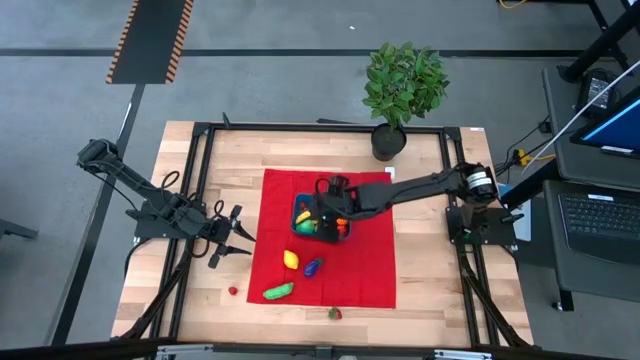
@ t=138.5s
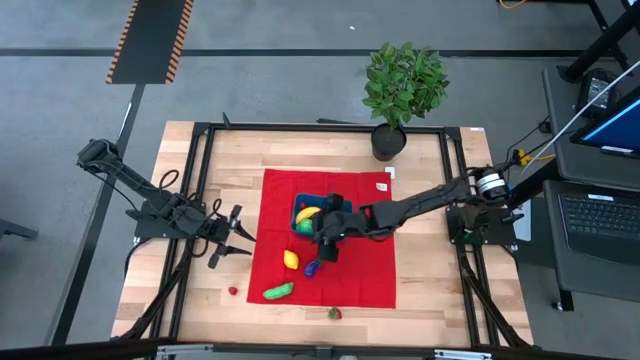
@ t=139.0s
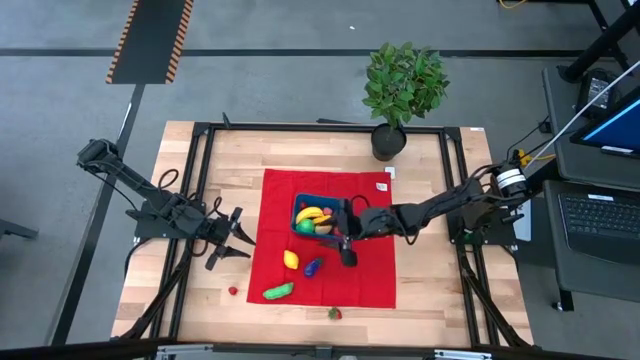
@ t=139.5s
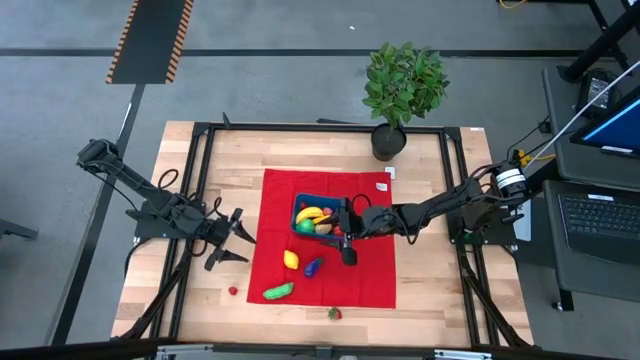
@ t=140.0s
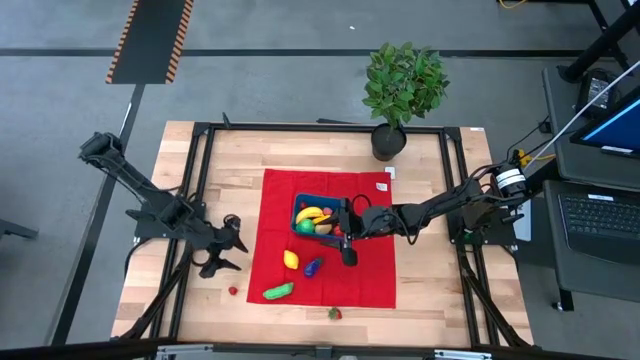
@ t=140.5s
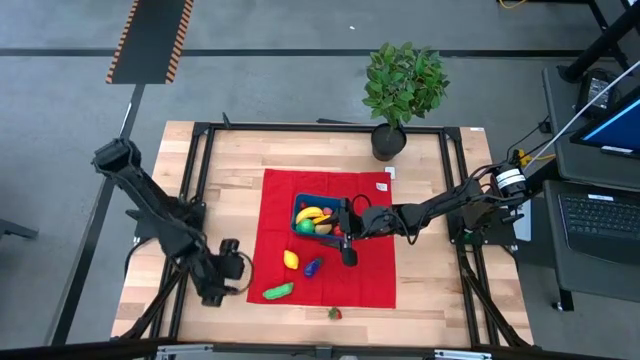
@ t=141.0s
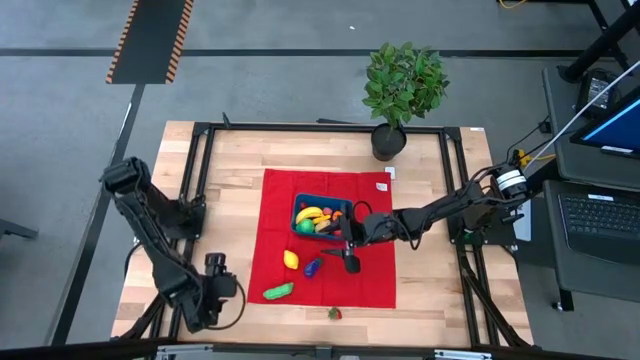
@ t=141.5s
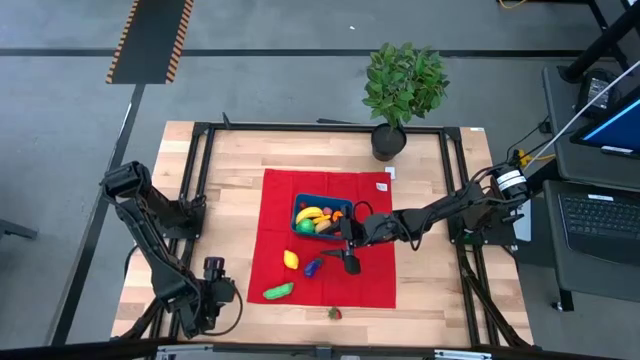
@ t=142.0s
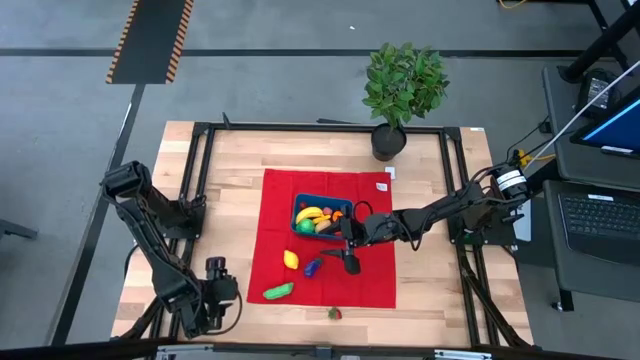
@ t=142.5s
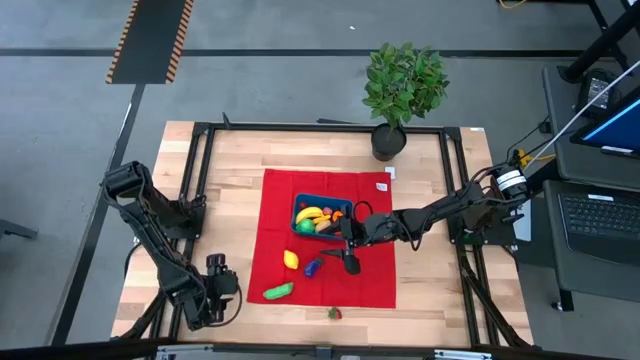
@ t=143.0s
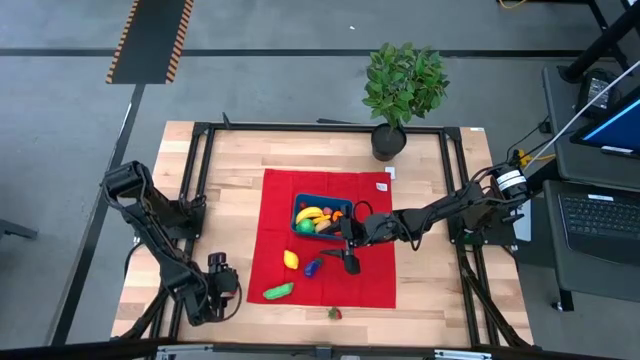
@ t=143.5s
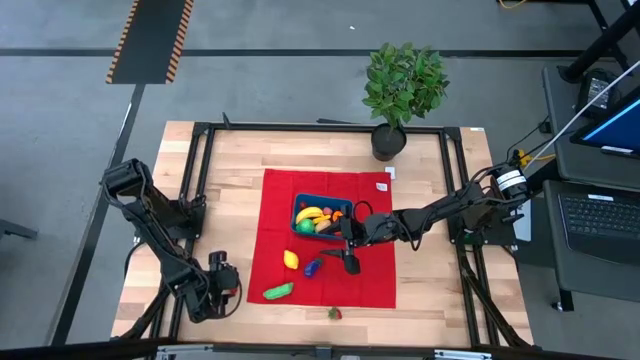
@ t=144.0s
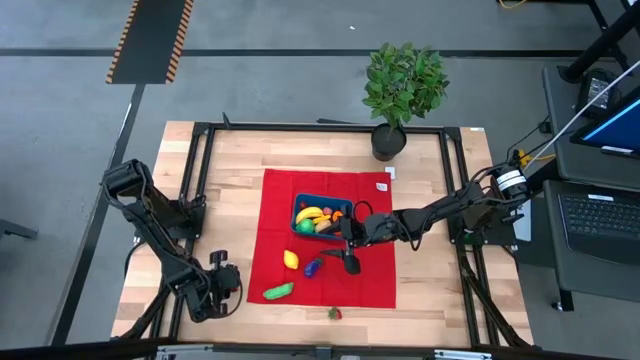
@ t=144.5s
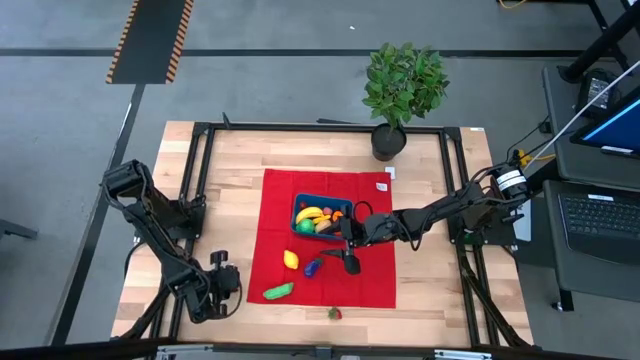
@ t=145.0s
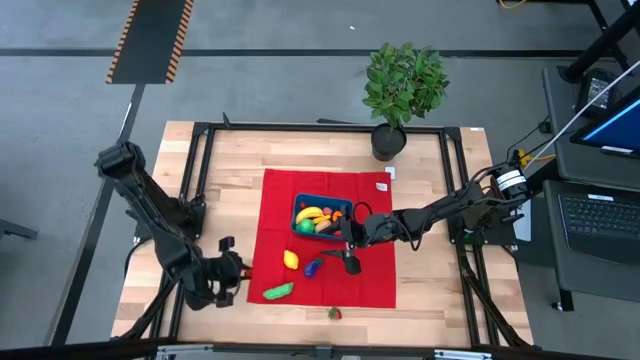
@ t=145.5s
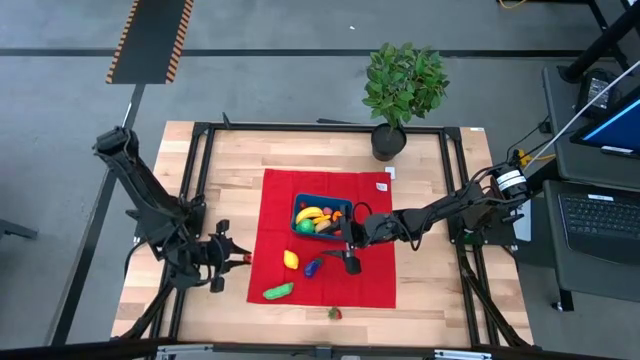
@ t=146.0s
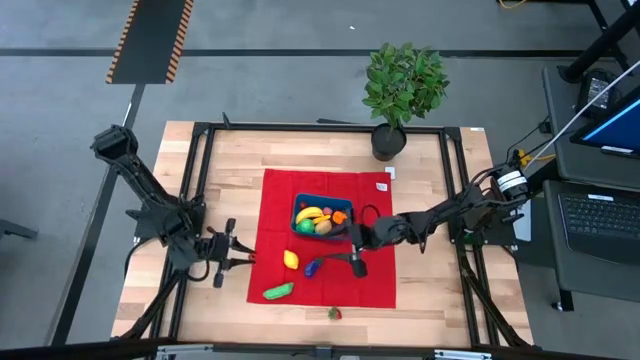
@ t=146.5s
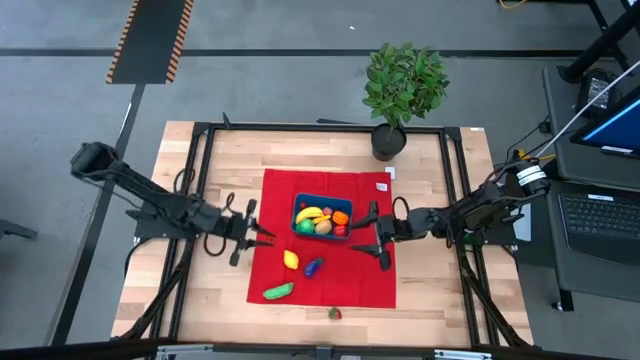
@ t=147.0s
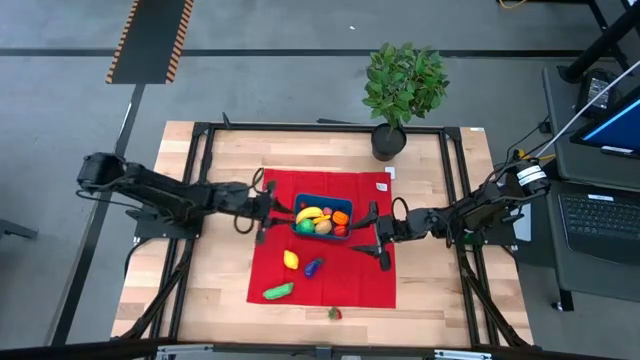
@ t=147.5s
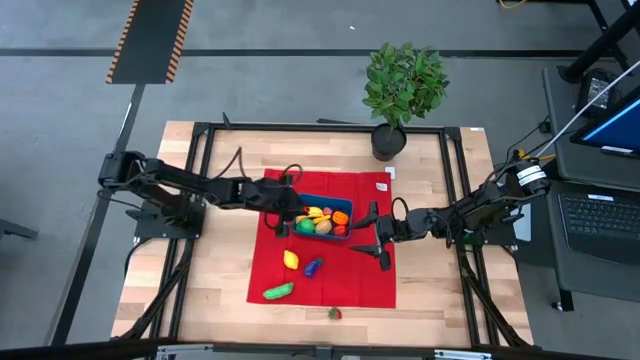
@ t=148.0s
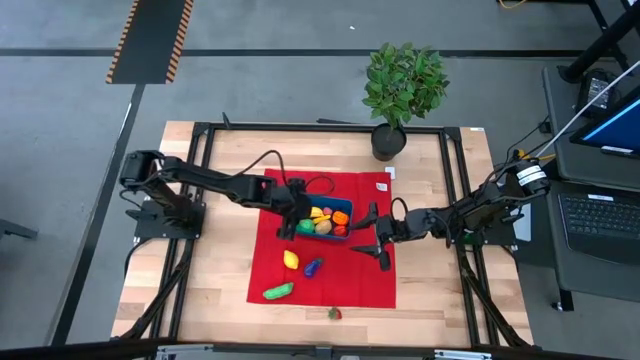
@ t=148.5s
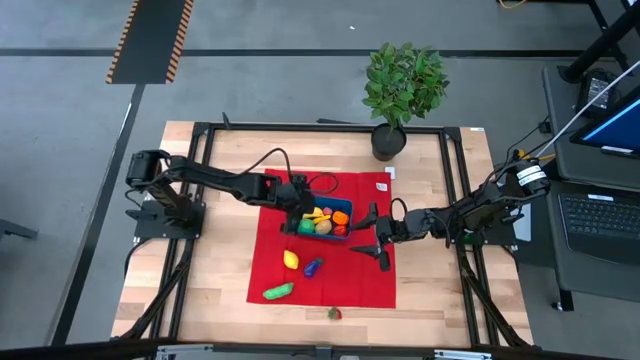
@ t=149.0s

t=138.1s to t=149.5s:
Task: Pick and placing Produce into tupperware
Put the red raspberry into the blue bin

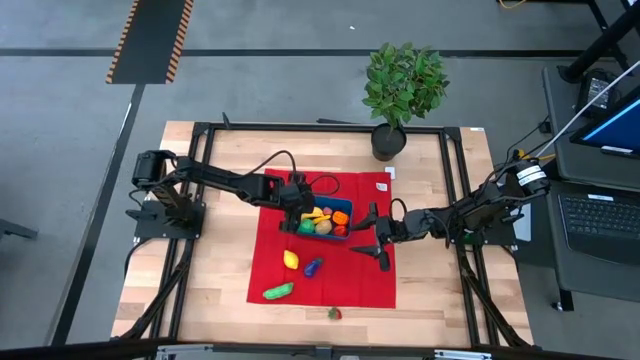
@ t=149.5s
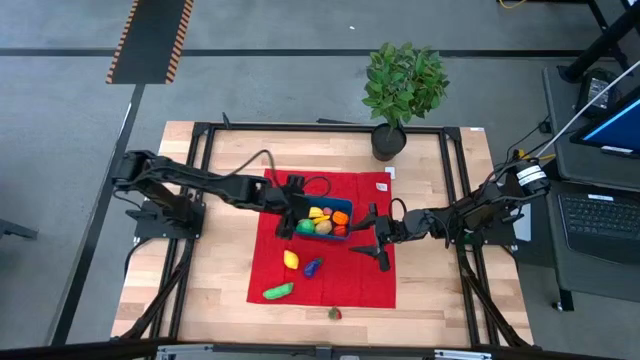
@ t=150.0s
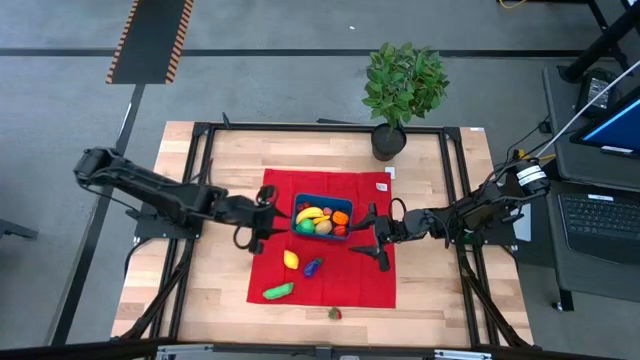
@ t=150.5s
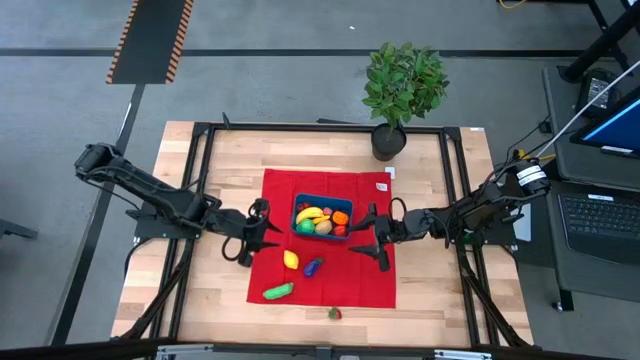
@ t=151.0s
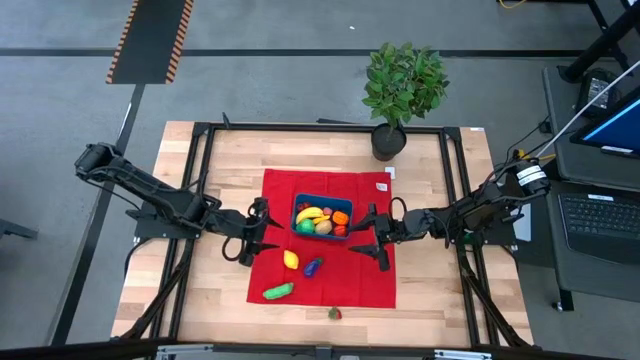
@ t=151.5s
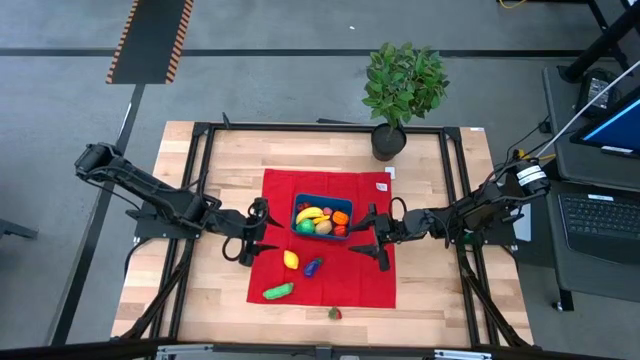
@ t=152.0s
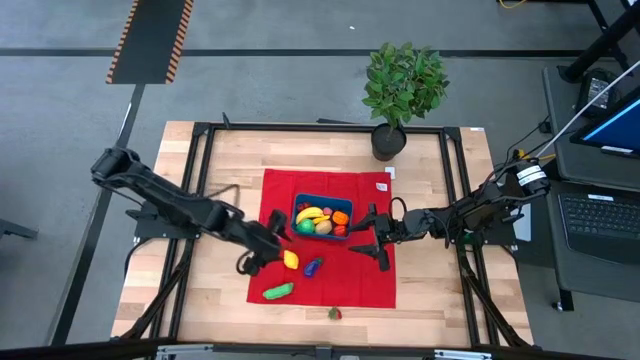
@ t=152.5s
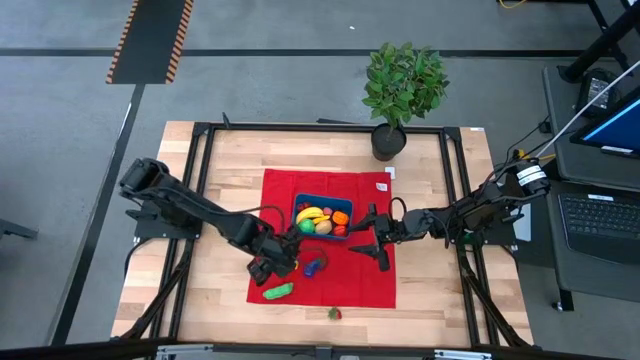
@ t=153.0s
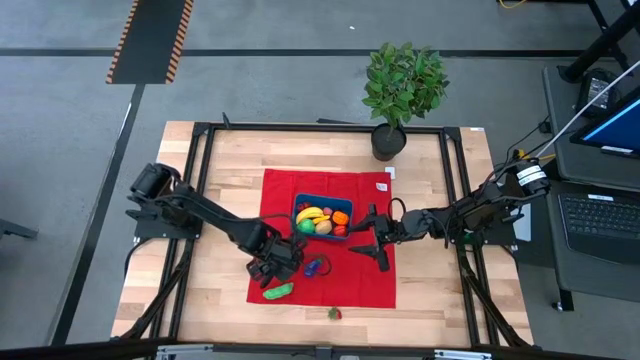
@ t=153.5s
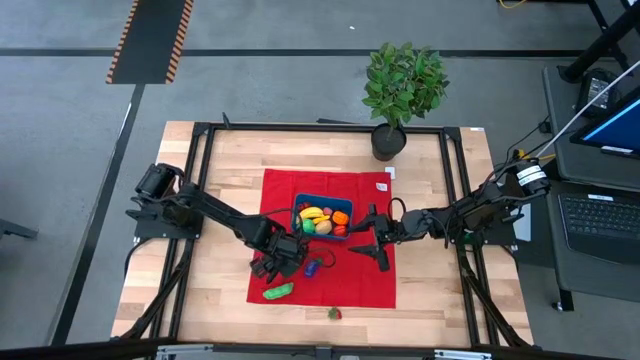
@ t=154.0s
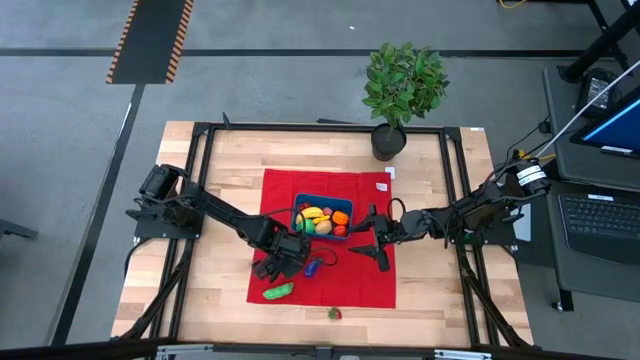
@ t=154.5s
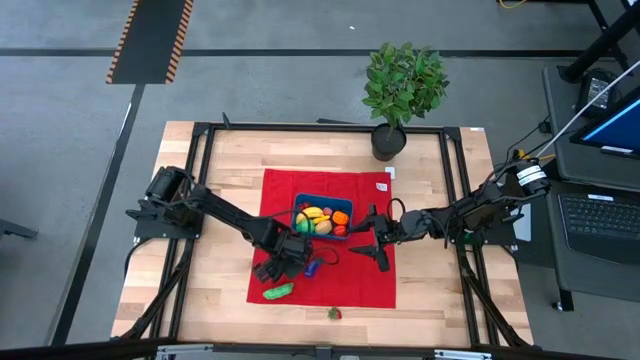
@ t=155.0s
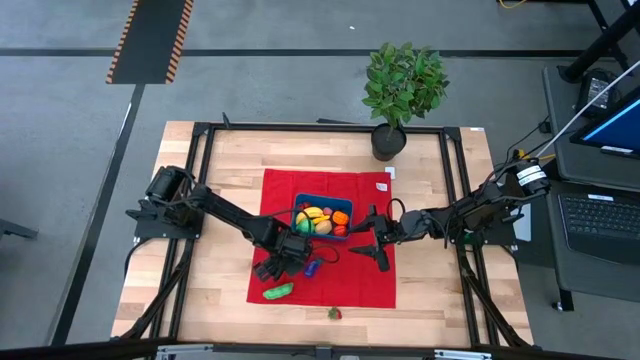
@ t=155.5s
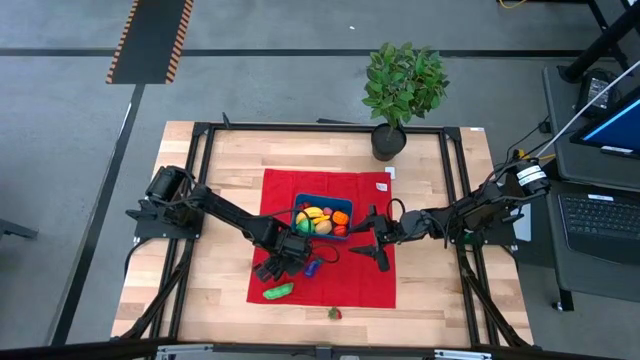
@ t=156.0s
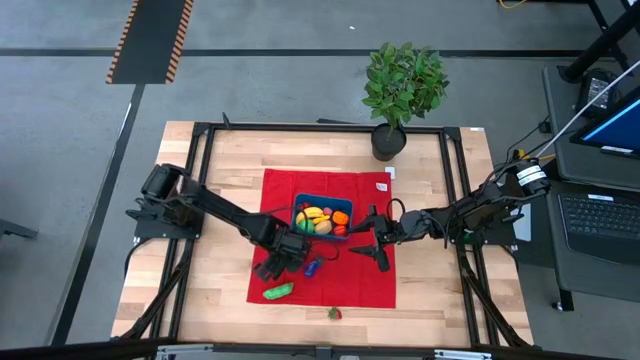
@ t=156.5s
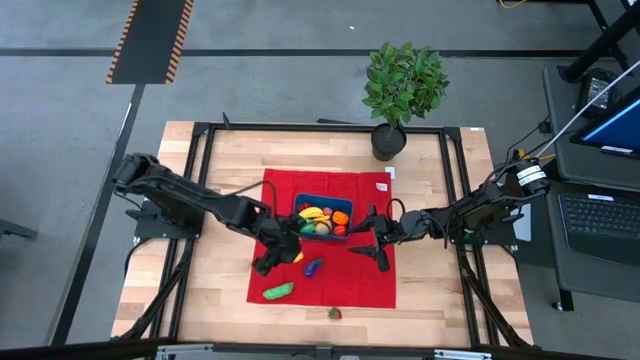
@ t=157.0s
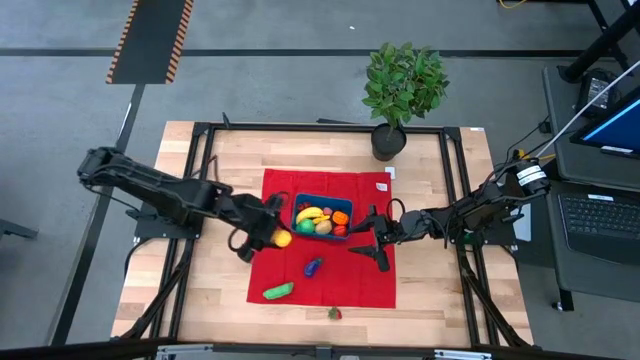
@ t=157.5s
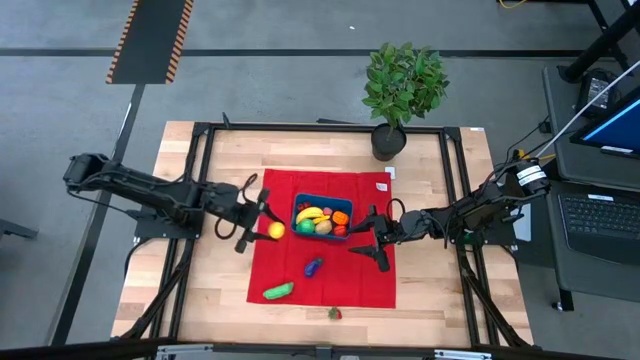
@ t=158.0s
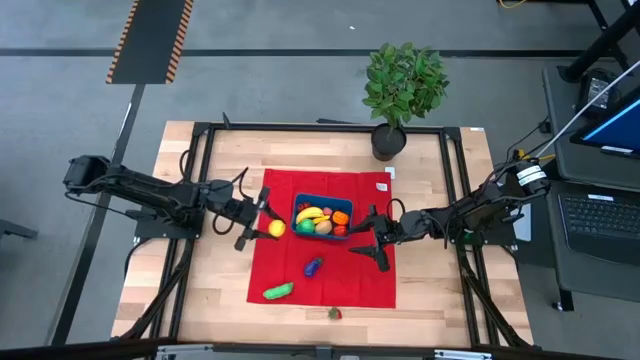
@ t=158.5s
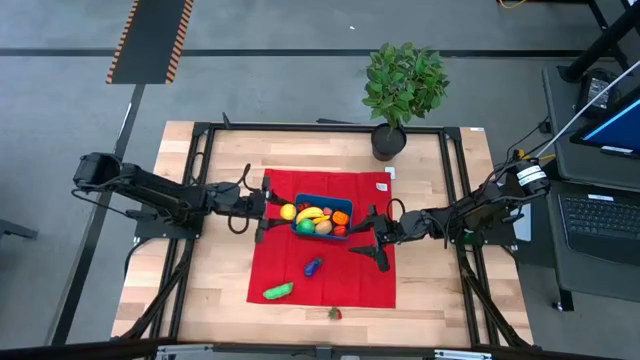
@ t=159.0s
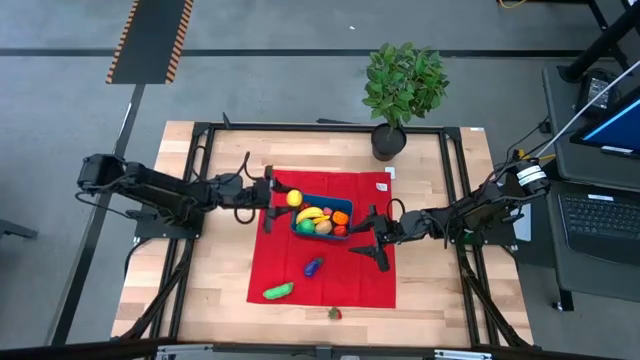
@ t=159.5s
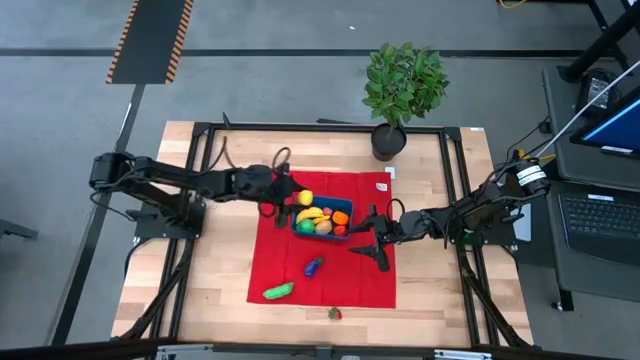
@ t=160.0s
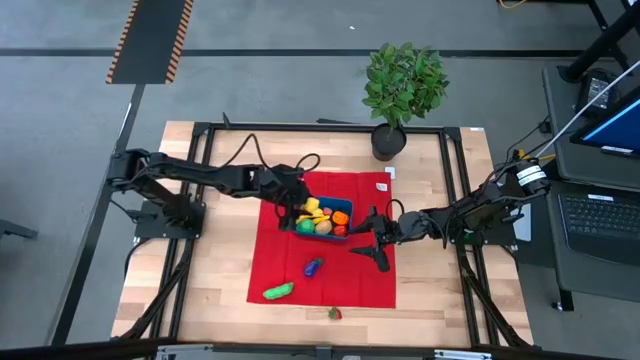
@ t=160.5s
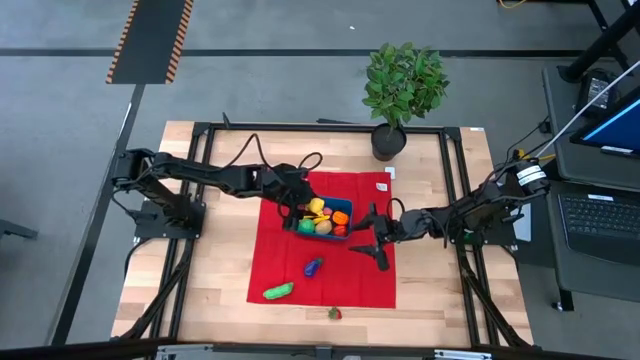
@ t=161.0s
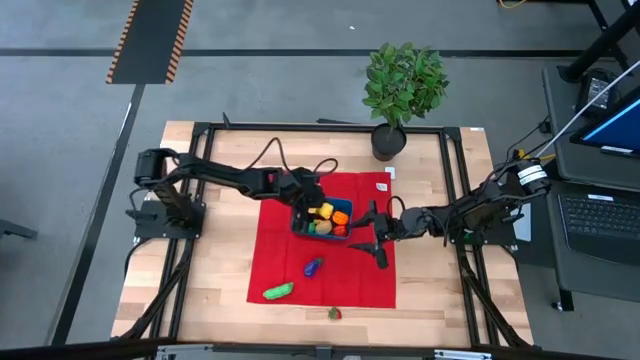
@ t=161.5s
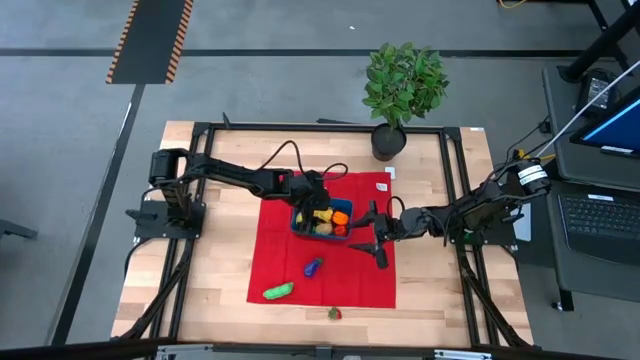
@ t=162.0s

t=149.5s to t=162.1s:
Put the yellow lemon into the blue bin
